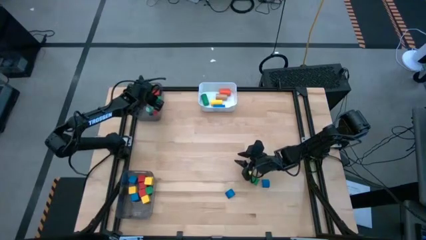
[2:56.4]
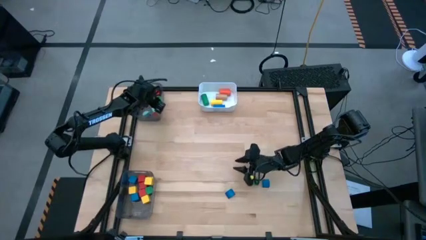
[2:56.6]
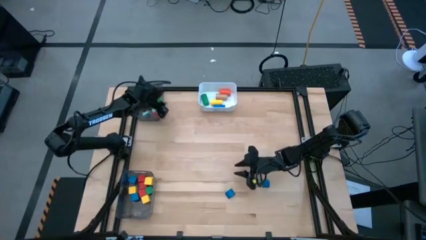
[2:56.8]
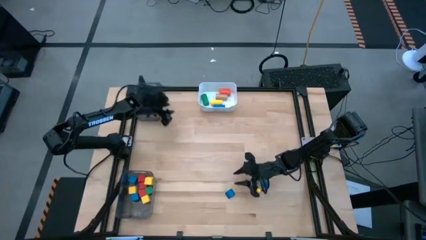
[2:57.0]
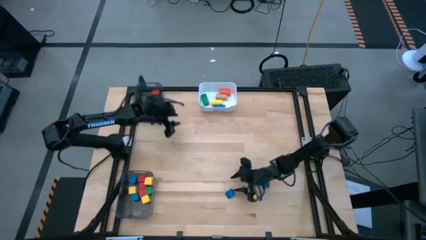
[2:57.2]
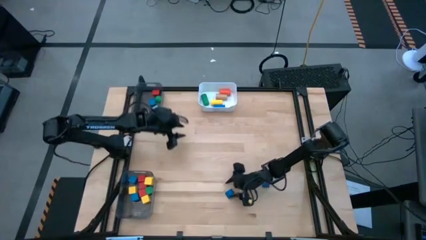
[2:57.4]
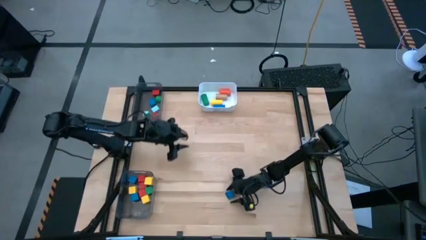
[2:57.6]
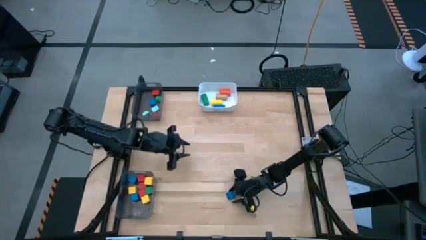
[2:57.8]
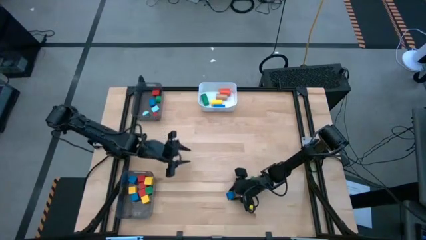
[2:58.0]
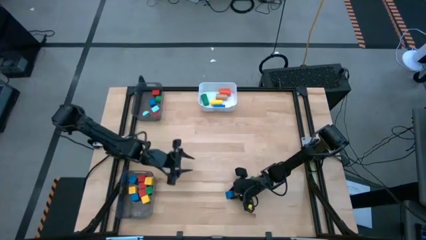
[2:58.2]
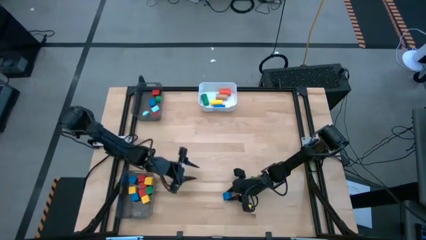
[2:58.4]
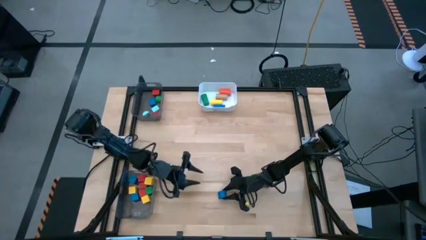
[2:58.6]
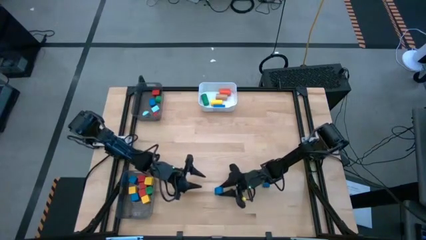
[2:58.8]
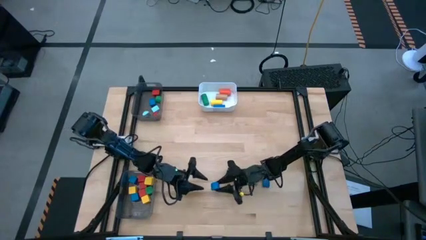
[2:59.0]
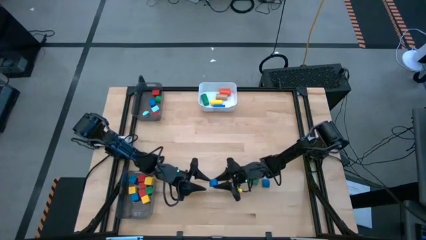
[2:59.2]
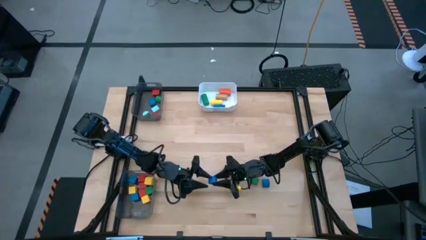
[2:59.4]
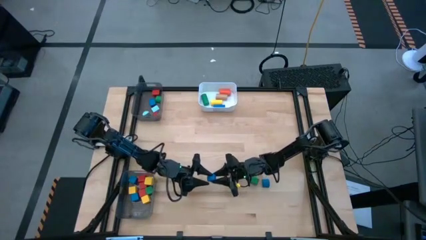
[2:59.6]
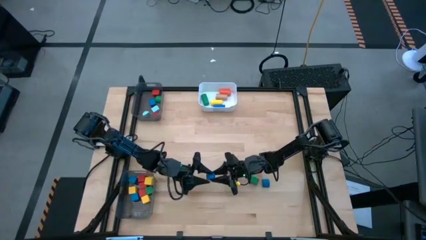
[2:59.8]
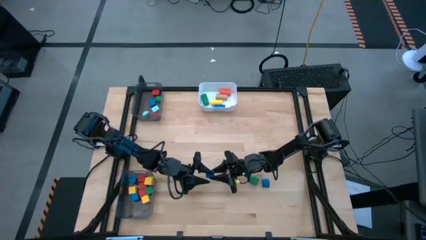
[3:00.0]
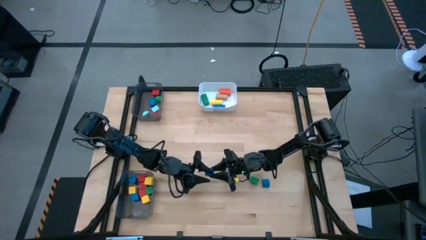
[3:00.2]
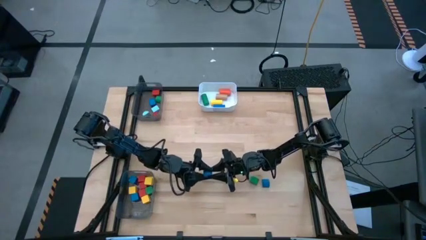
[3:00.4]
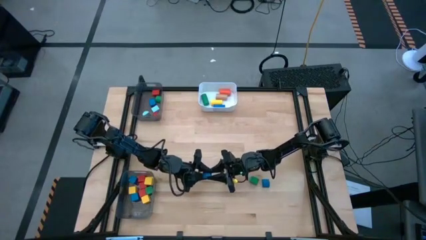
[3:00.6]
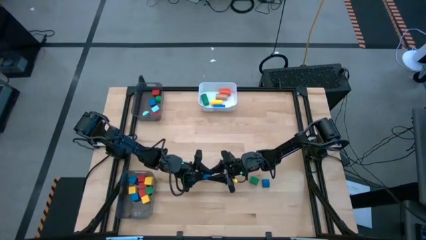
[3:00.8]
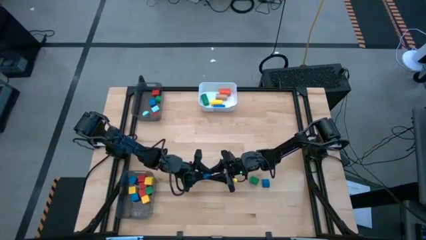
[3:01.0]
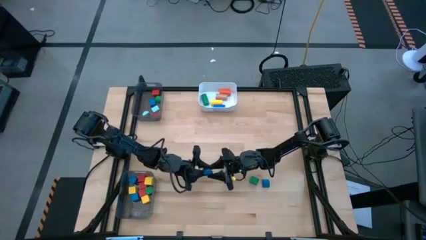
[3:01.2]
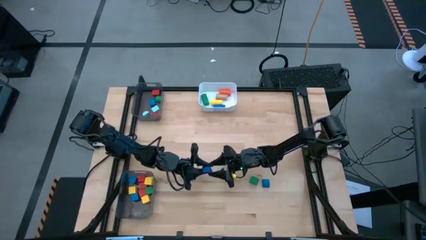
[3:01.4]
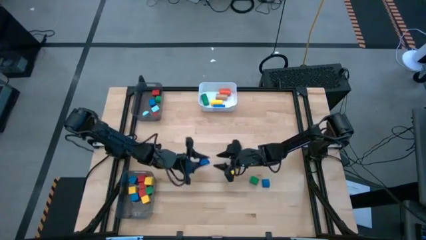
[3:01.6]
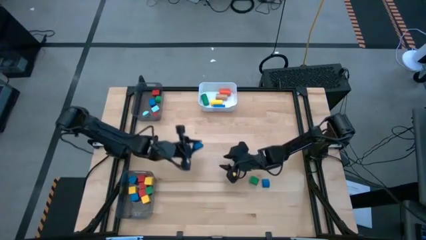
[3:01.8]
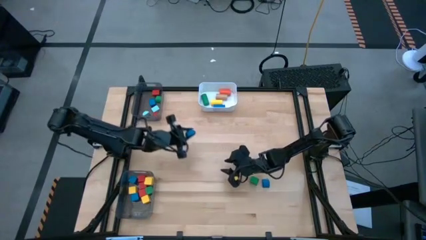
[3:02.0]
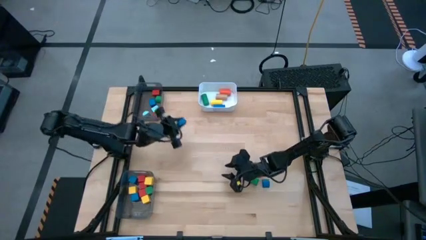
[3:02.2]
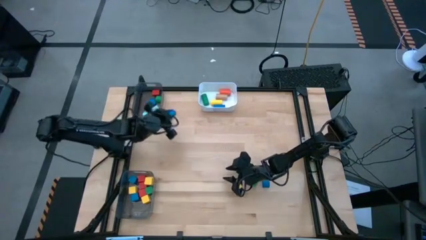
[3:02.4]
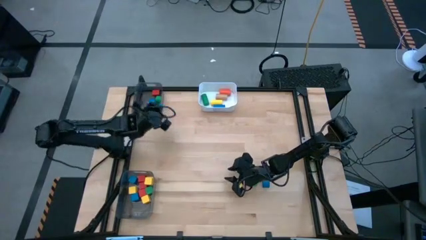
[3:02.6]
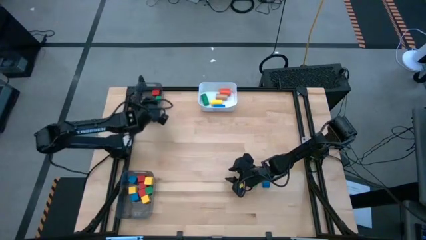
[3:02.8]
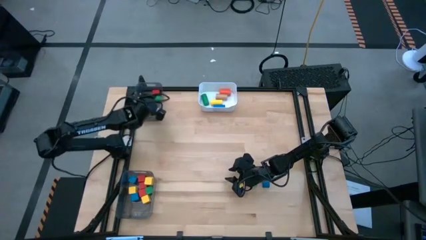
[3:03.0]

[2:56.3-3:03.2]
Task: Sort blocks by size
Put the dark blue semicircle block into the top black bin

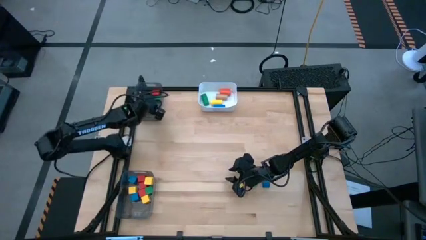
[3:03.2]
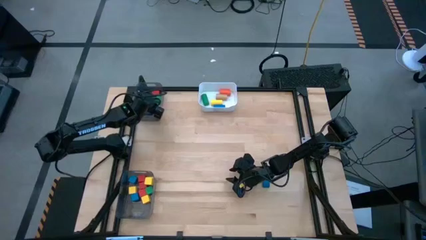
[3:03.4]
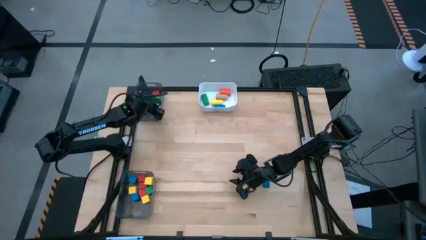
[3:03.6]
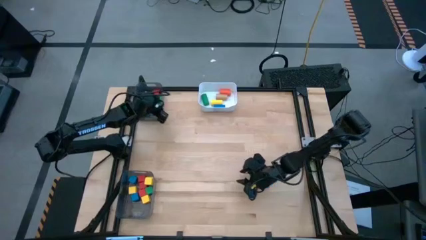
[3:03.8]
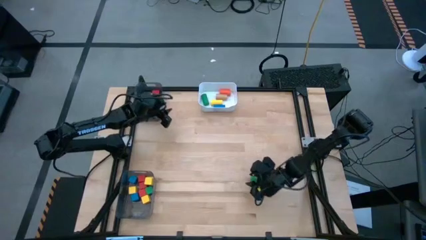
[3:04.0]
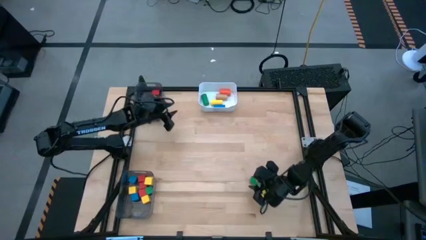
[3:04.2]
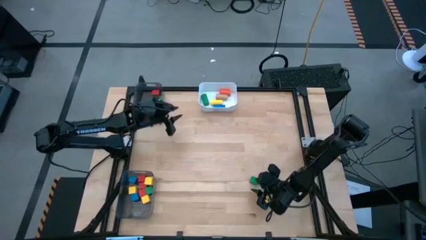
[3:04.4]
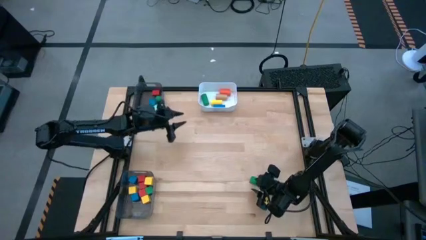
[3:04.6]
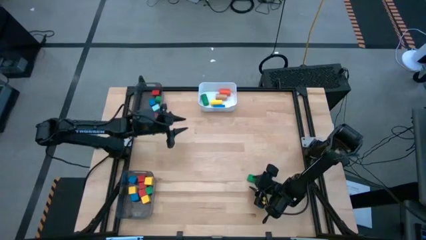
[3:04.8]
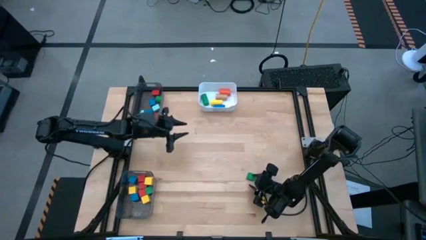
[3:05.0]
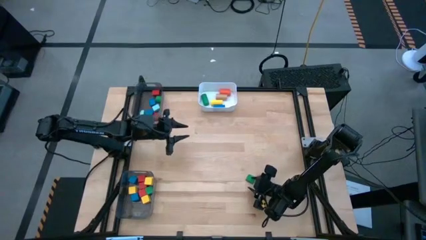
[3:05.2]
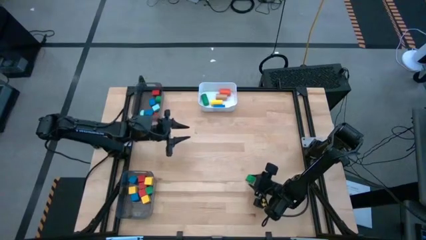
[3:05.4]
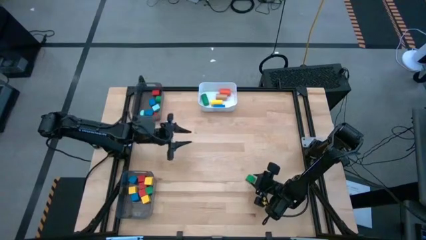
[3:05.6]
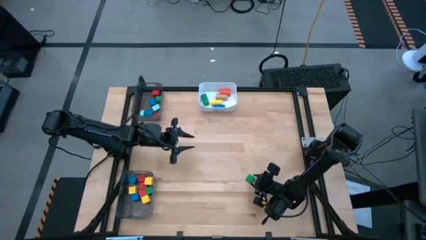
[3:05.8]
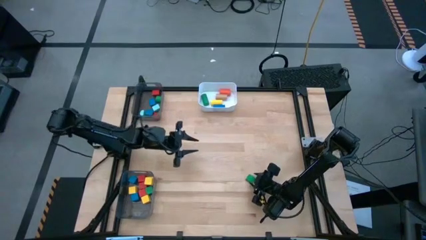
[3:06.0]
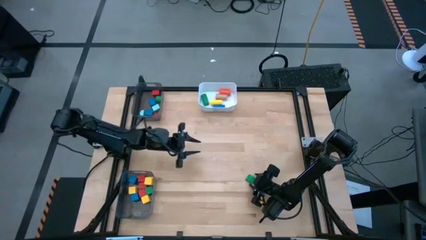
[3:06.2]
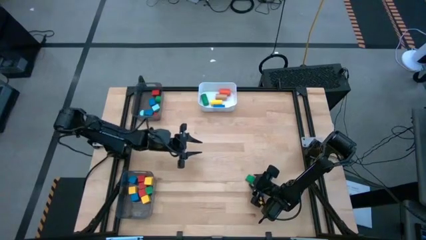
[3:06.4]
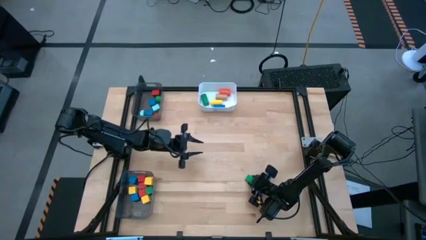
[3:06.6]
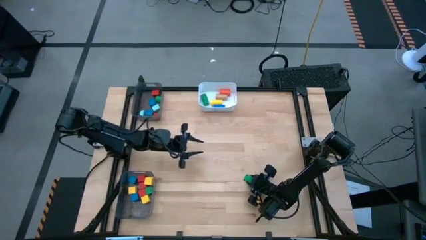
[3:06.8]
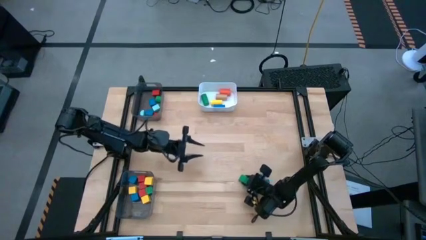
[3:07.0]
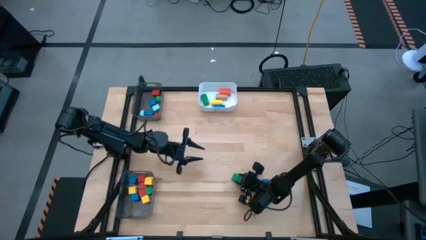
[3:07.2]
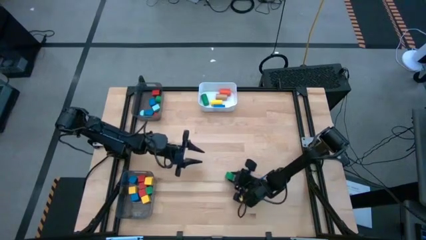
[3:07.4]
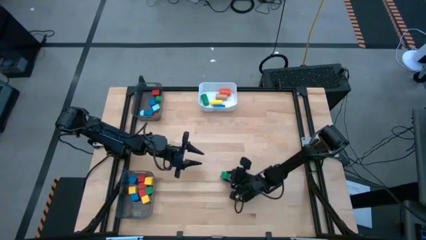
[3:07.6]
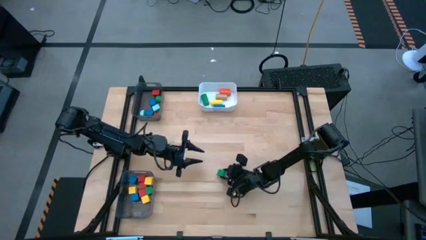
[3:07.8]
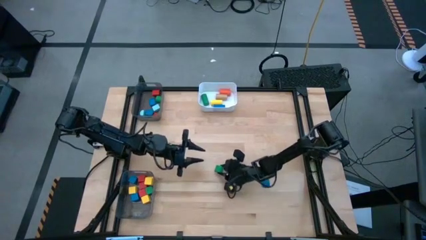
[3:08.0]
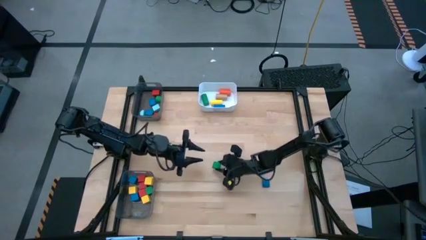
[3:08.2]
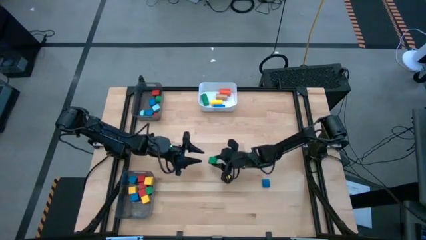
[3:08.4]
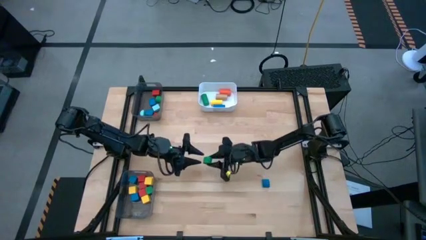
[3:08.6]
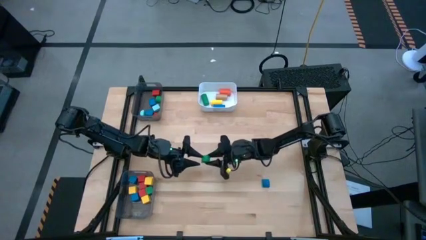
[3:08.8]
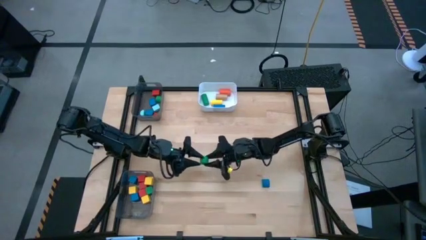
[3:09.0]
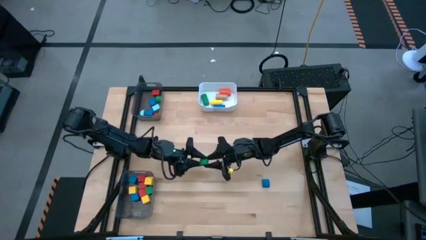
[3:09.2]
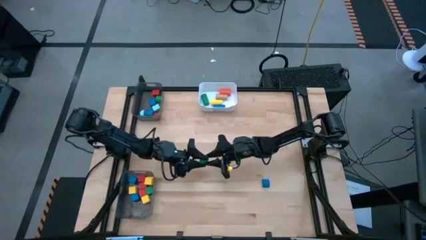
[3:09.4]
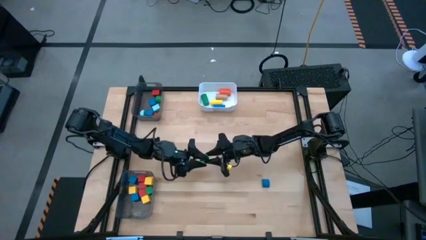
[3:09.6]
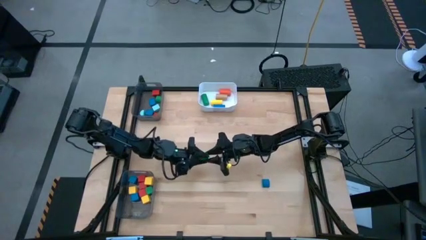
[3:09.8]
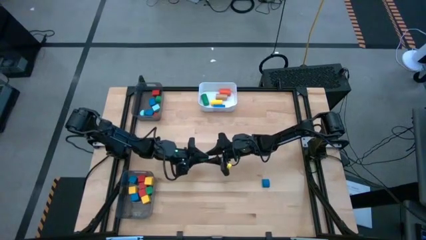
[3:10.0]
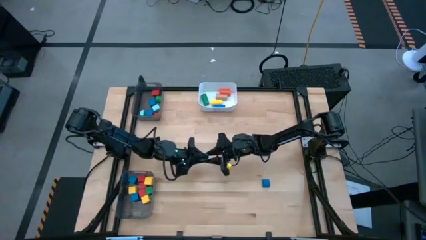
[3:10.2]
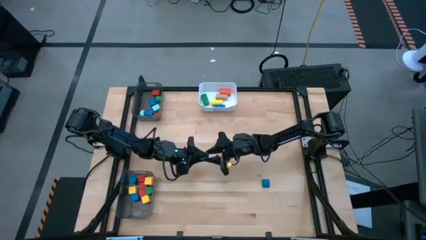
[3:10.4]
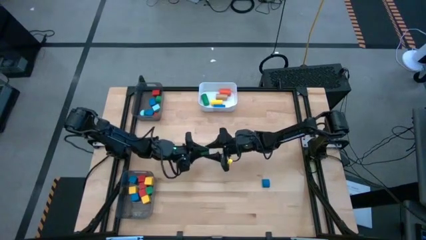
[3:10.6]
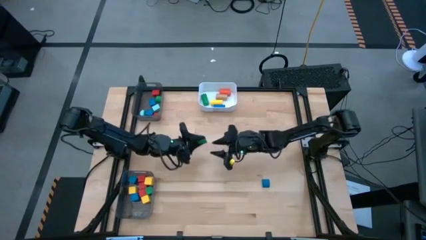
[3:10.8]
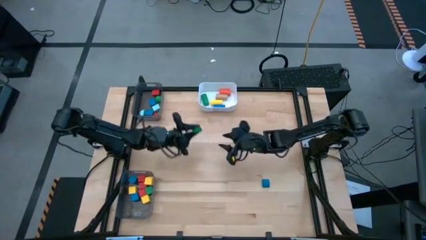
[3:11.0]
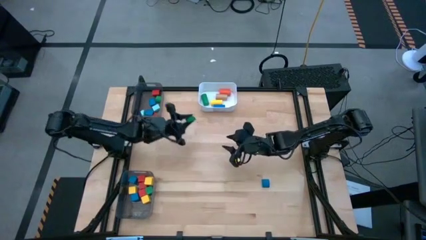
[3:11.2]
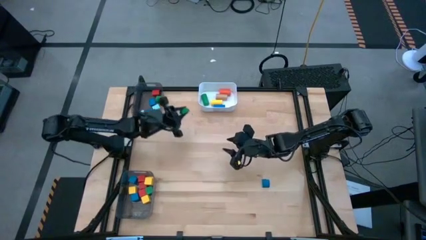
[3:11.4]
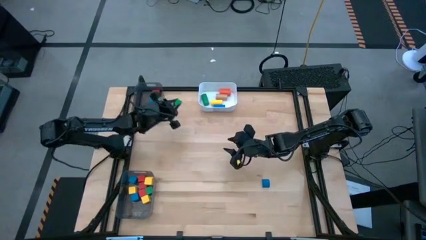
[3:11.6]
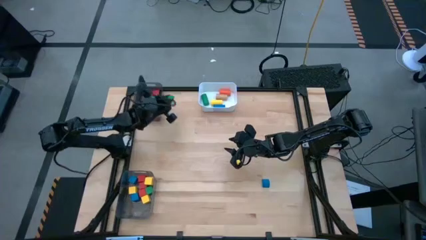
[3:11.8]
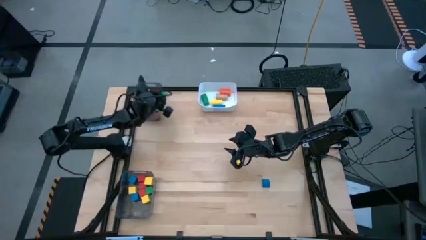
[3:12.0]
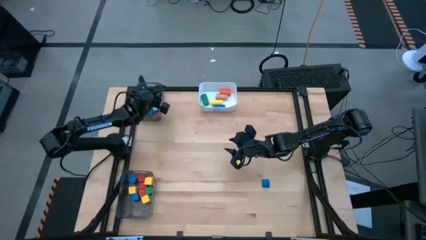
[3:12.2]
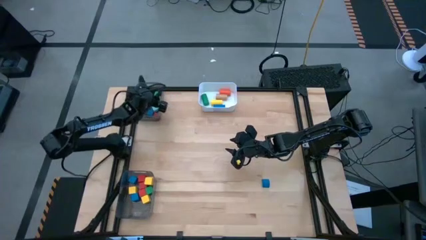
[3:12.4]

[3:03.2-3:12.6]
Put the green semicircle block into the top black bin
